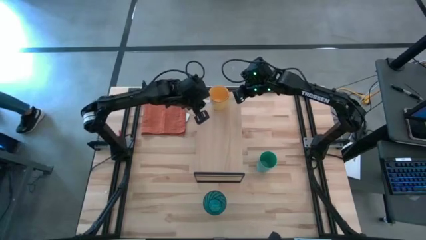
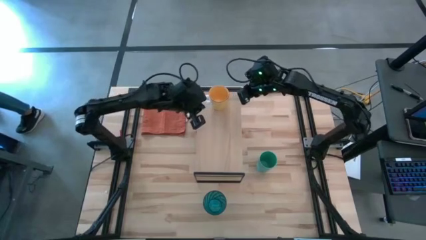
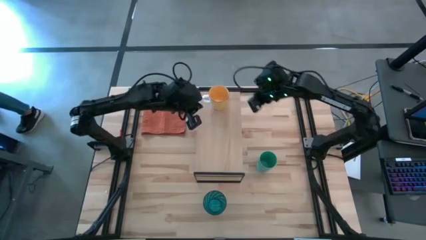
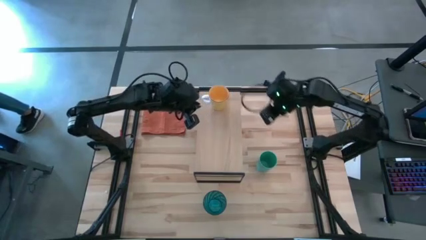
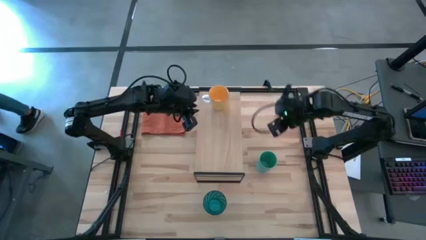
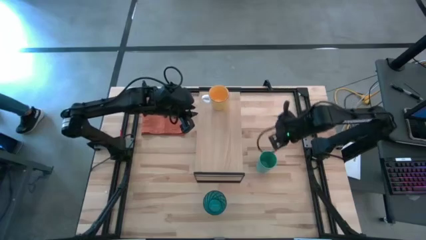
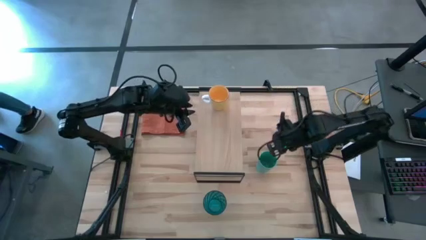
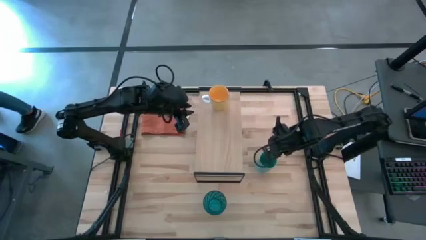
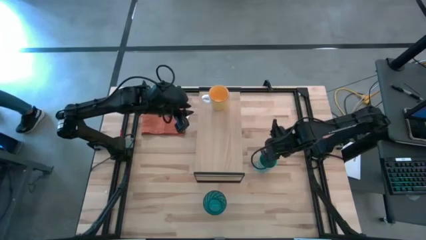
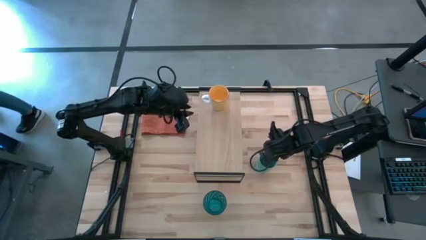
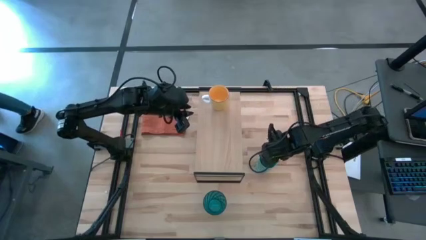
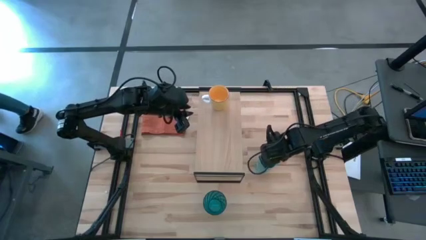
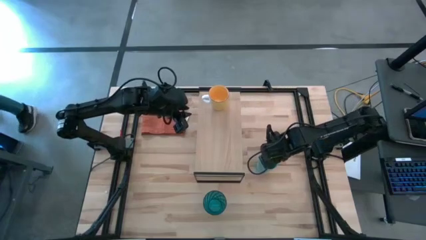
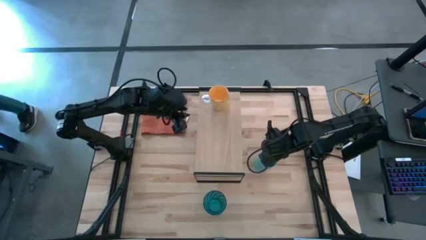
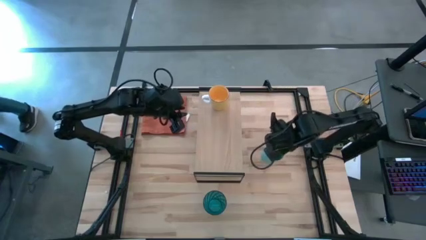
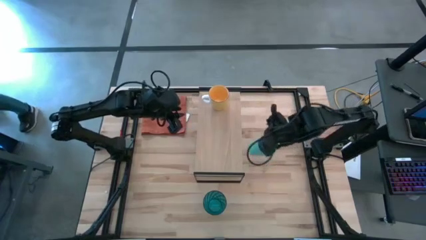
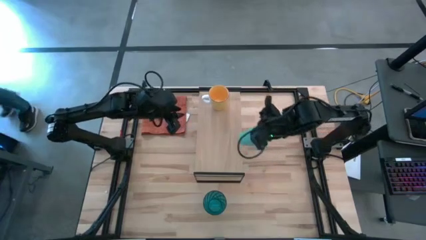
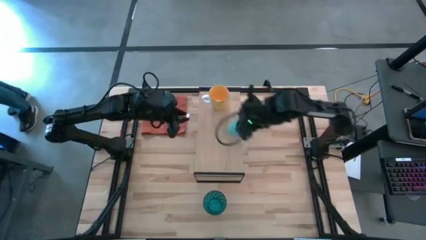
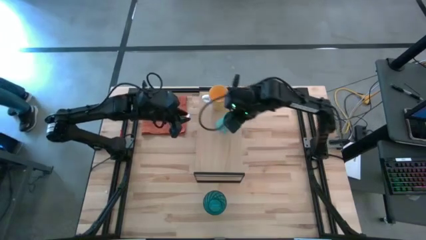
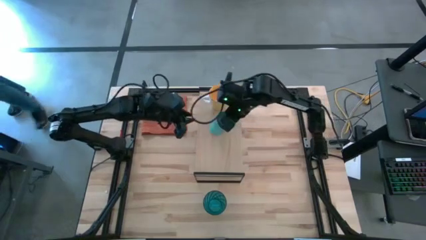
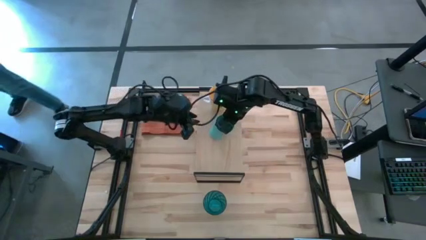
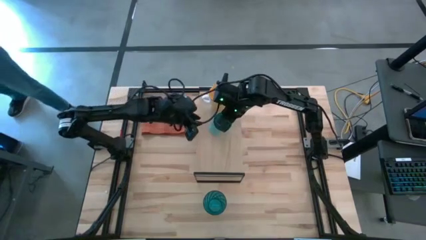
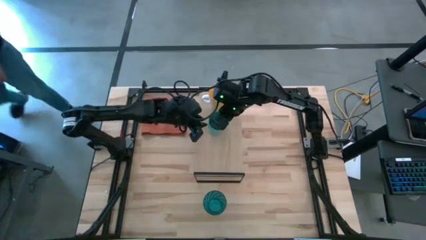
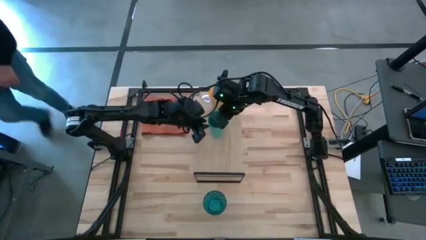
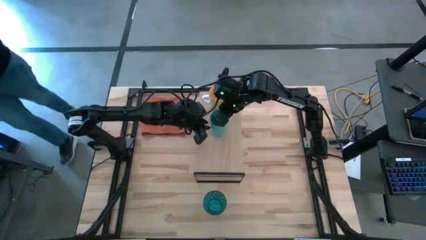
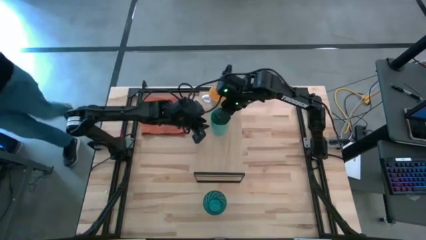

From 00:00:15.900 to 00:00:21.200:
Task: Stack small to large cups/mugs on shelf
Put the green cup on the shelf

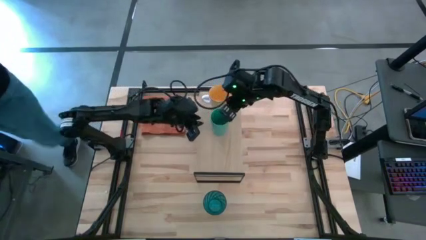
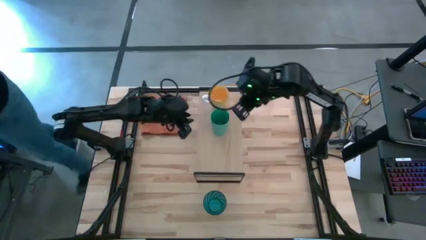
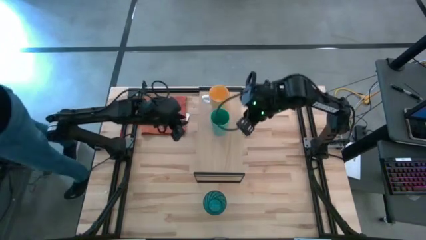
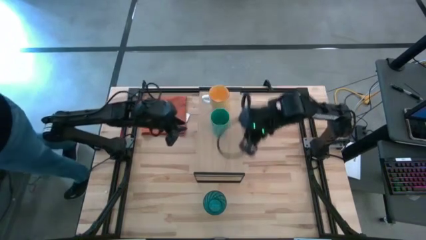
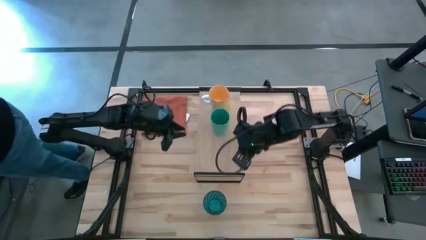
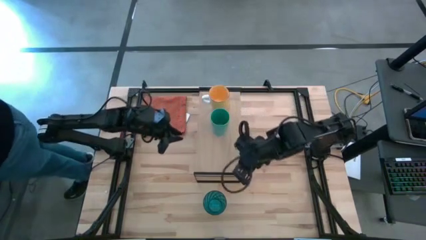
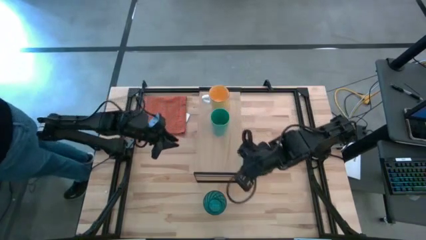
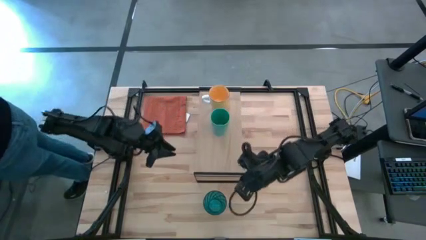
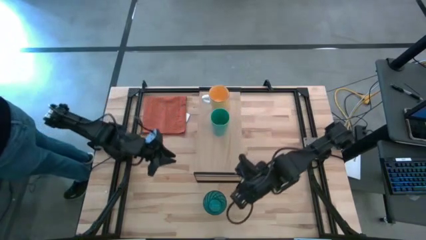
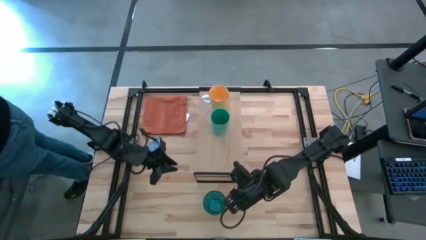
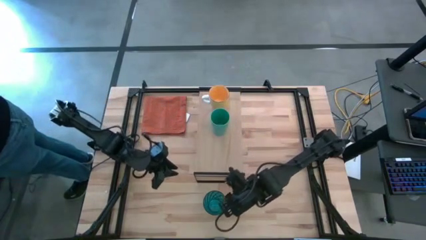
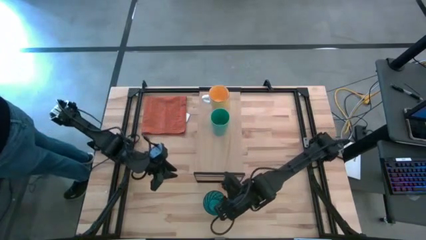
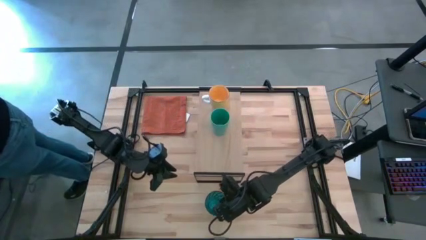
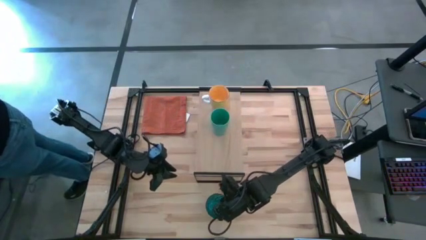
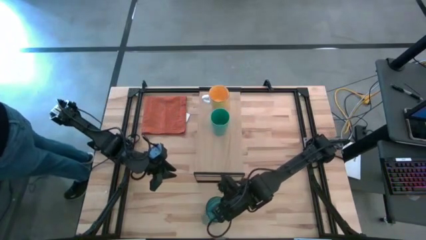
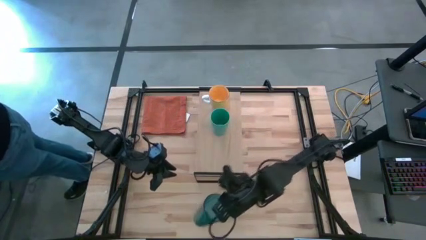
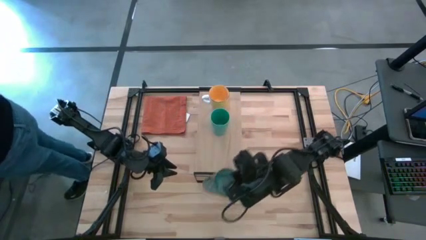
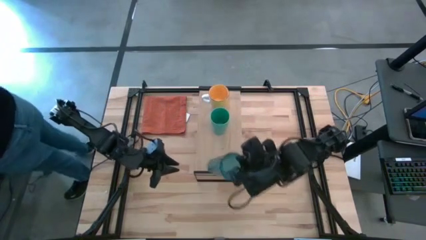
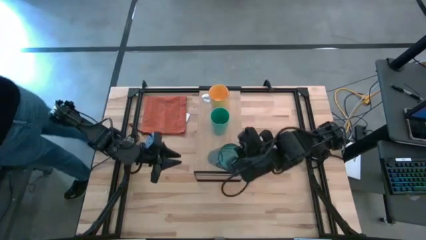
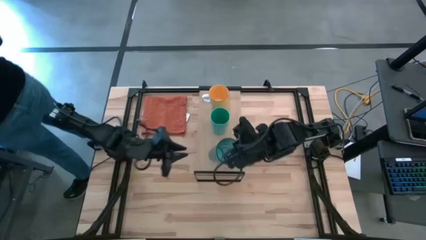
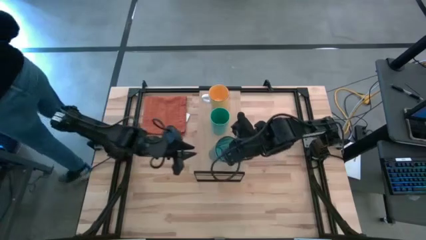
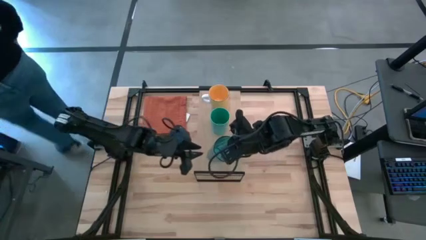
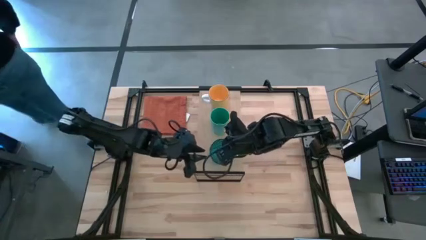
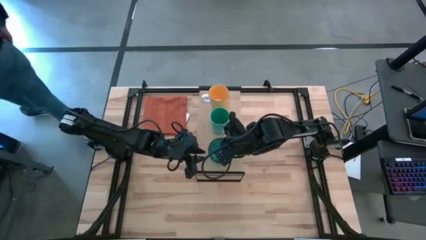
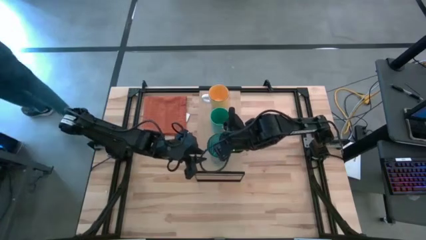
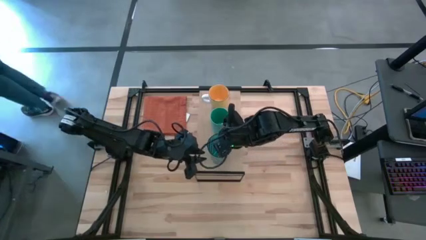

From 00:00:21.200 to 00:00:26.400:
Put the blue cup on the shelf

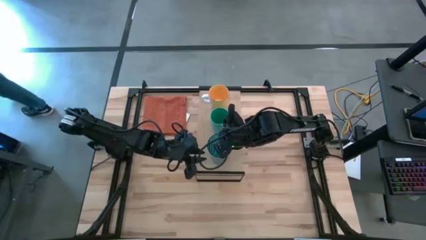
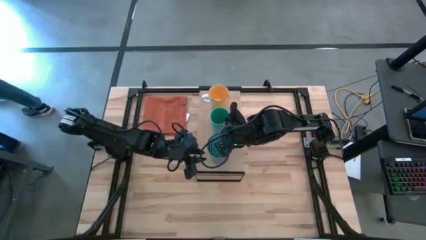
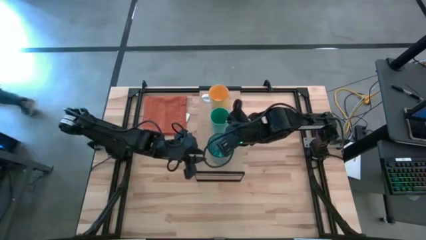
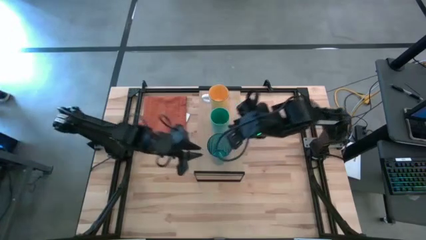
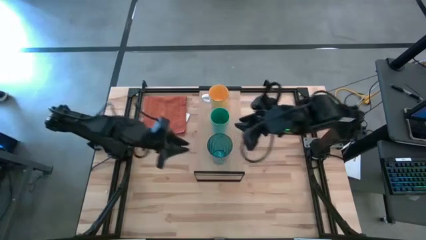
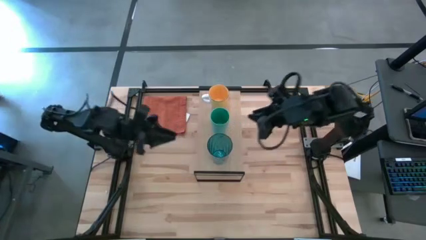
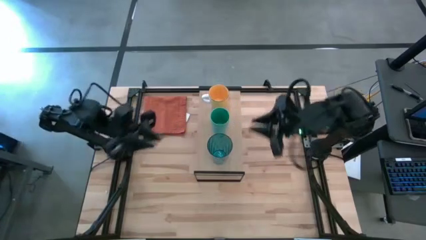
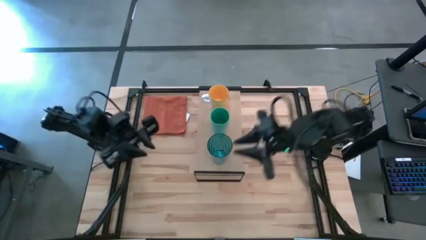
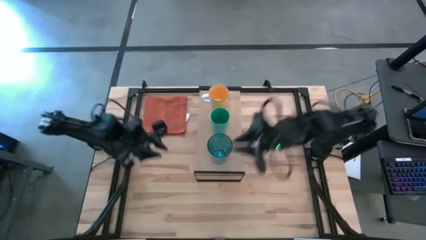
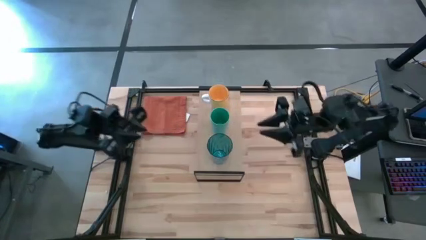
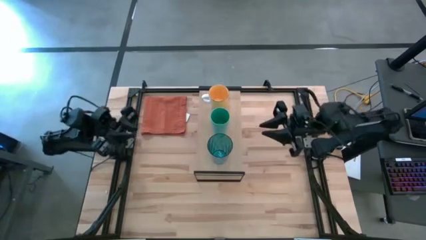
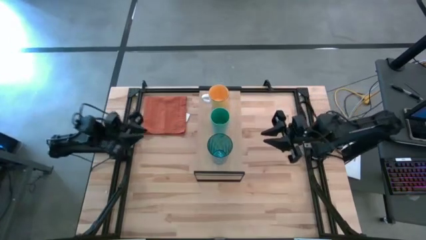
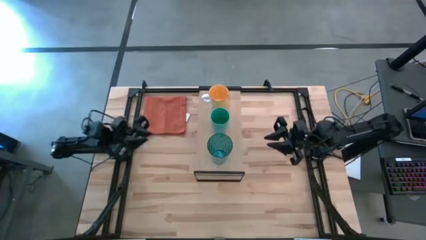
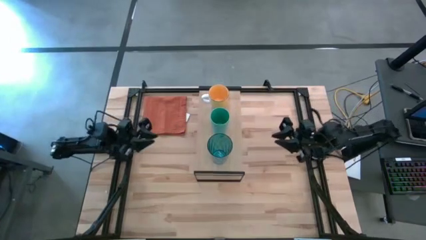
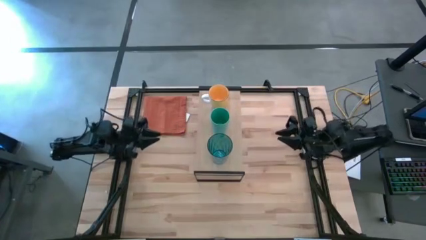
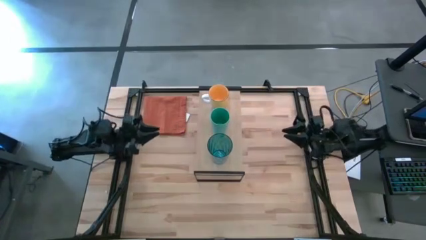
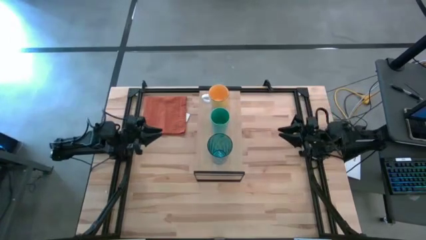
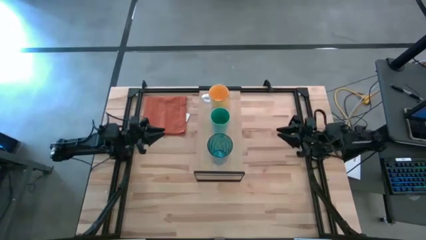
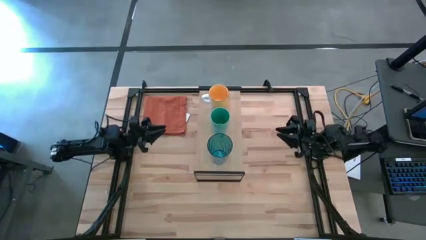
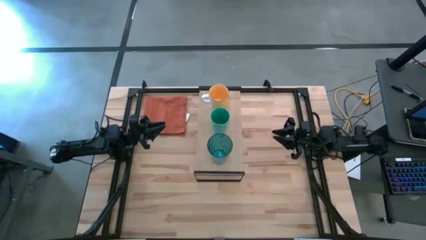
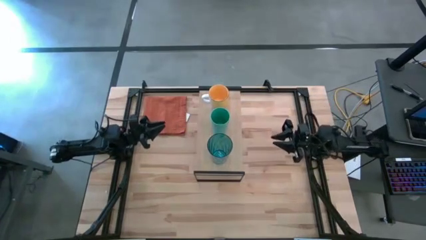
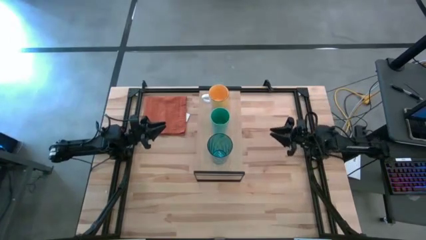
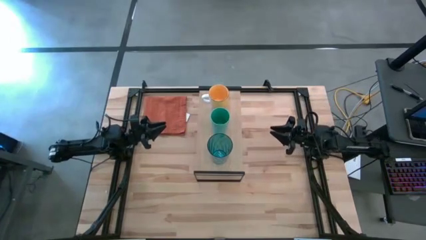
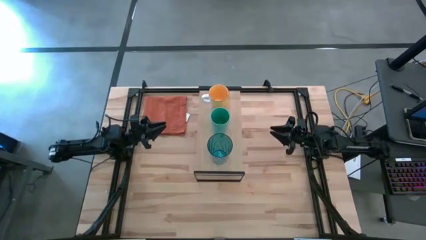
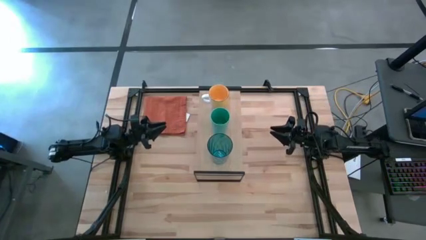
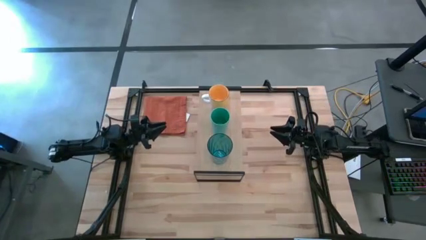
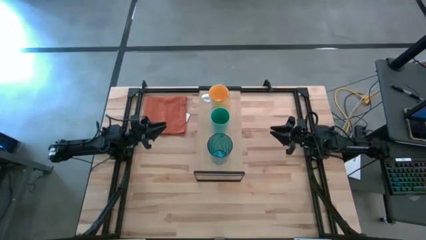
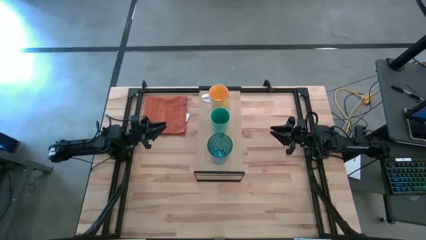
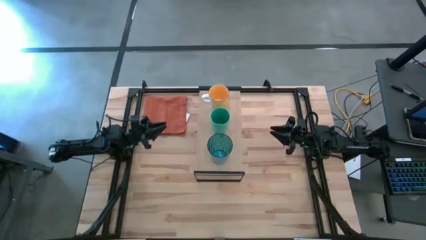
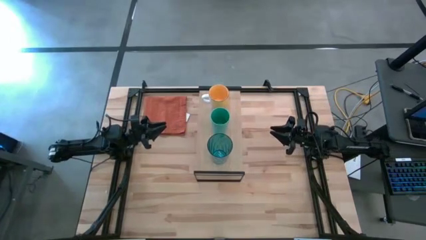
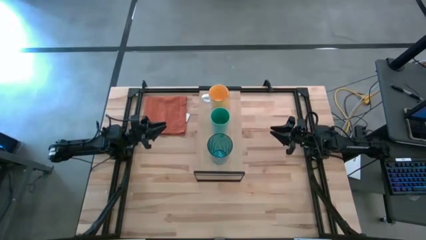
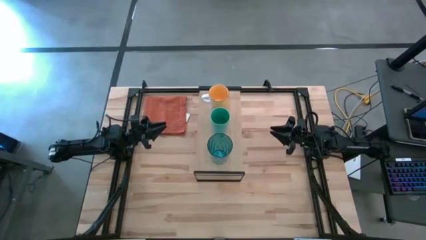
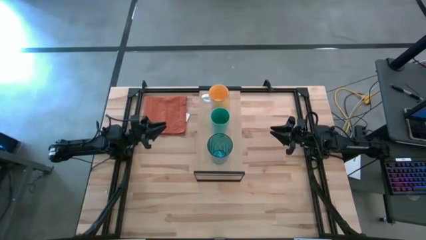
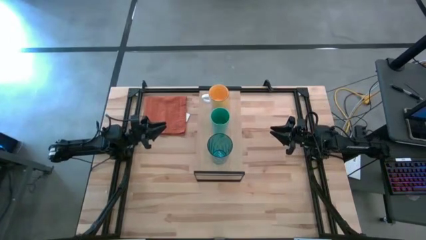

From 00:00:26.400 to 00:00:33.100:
Return to Home Position
